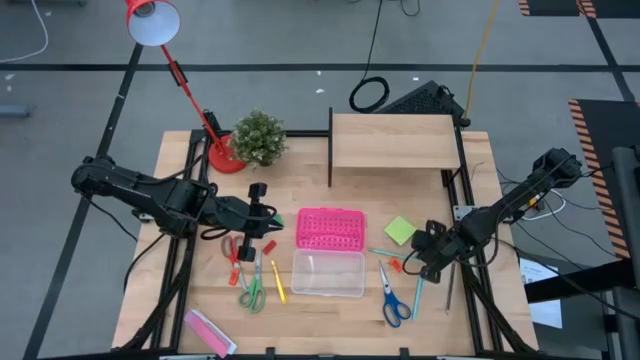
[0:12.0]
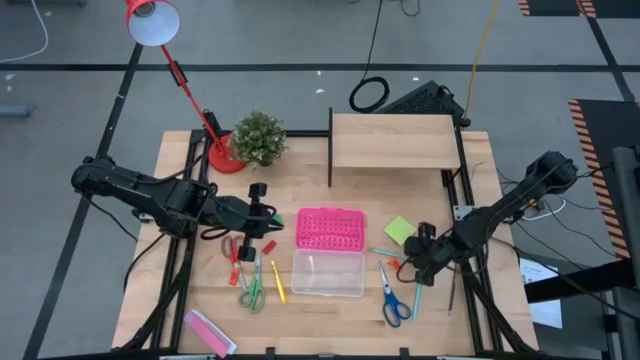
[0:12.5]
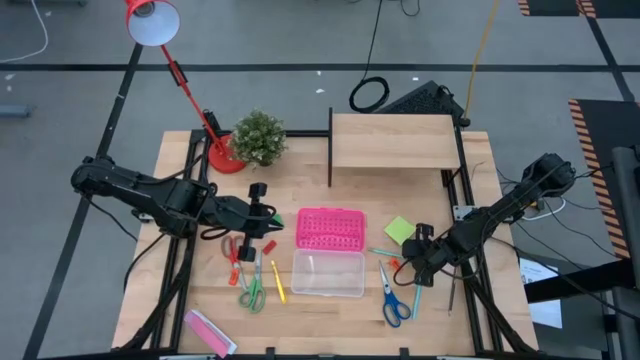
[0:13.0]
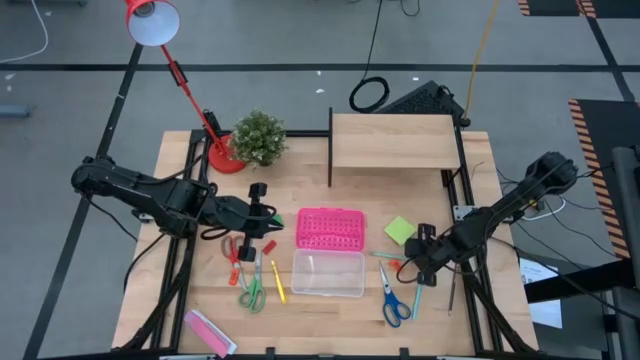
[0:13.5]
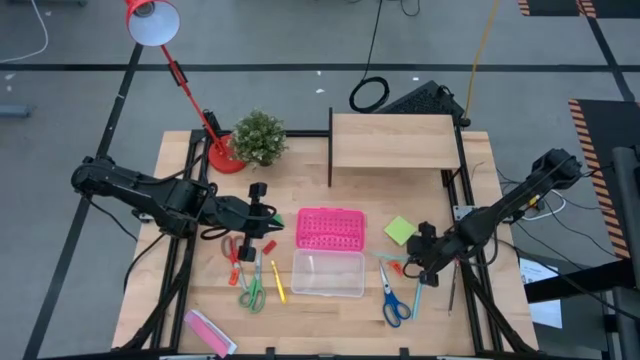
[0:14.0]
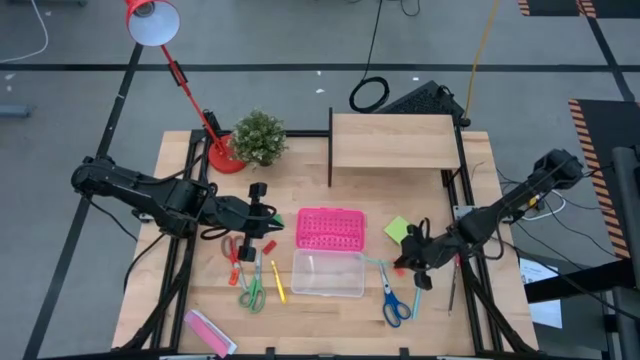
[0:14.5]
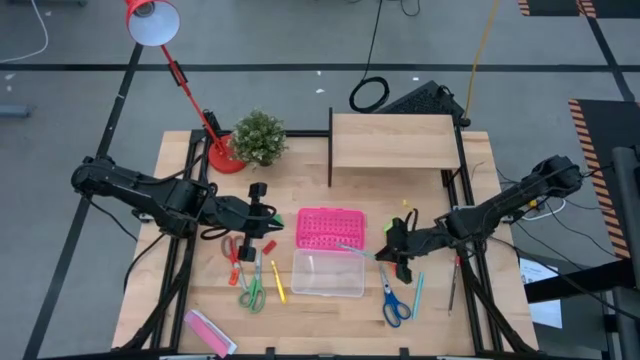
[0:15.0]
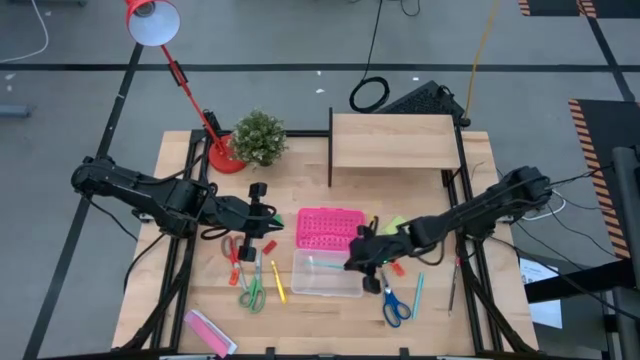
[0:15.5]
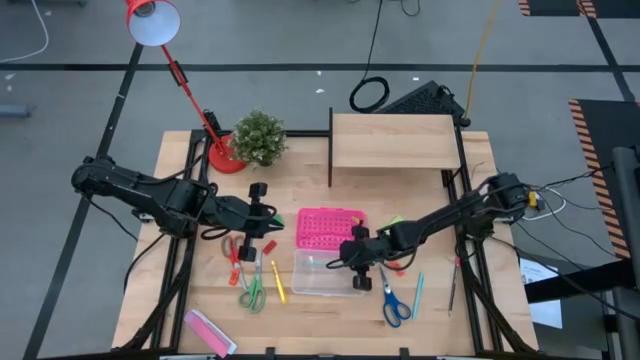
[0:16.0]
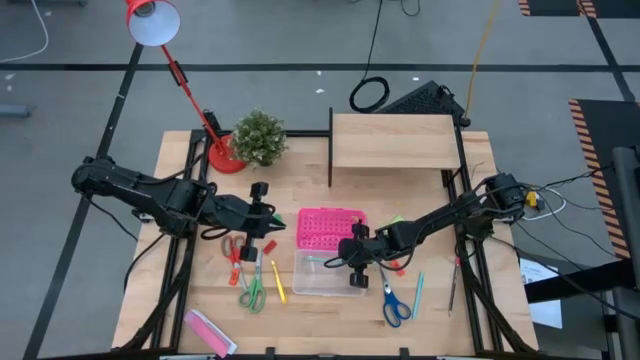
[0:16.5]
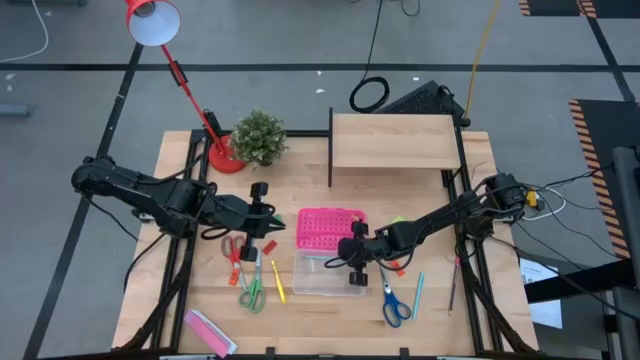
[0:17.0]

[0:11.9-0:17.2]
Task: Pack school essentials
Put the light blue pencil into the pink supply box

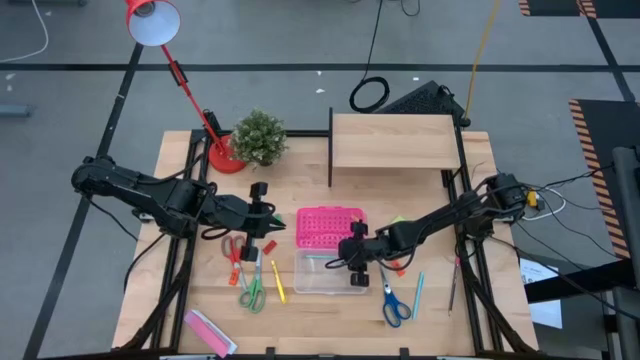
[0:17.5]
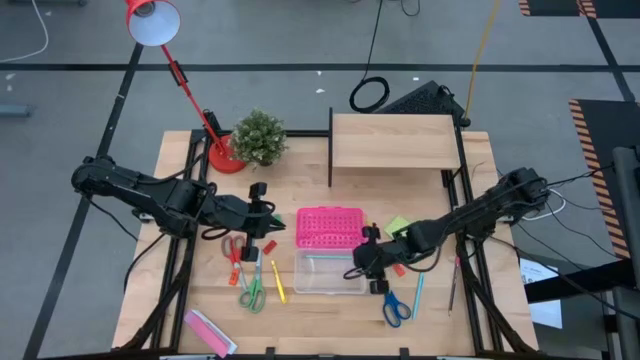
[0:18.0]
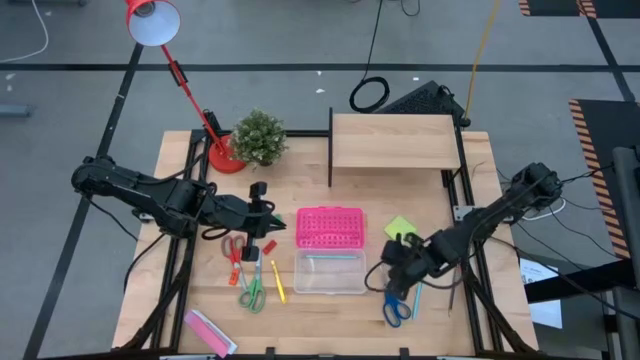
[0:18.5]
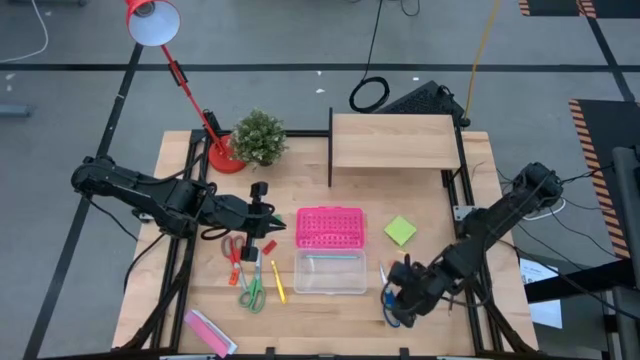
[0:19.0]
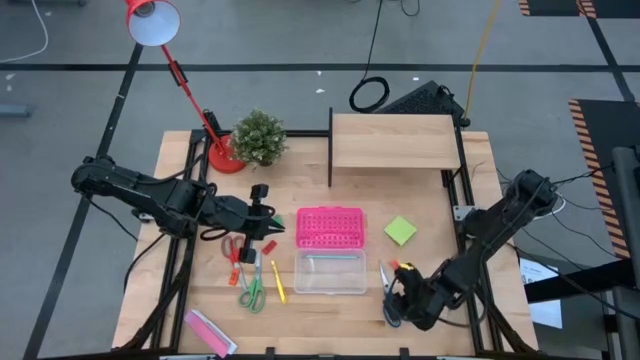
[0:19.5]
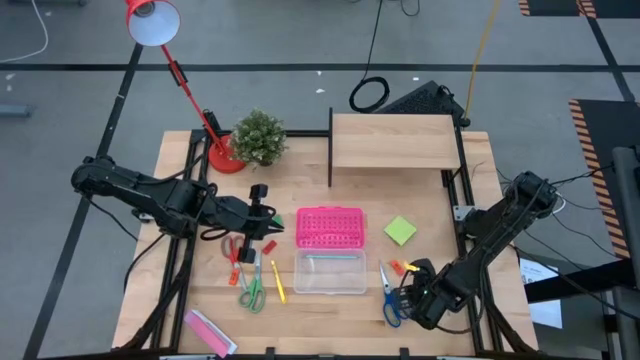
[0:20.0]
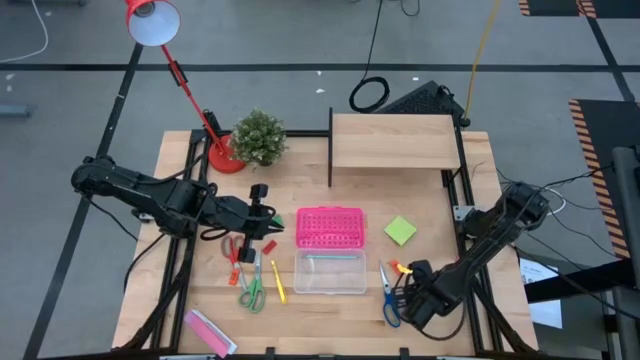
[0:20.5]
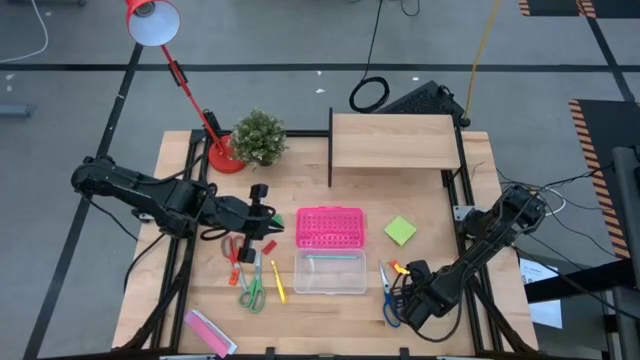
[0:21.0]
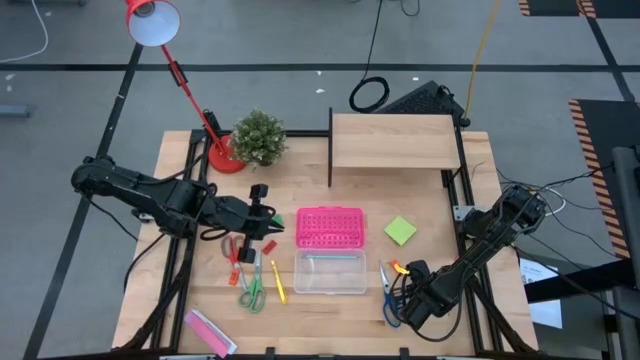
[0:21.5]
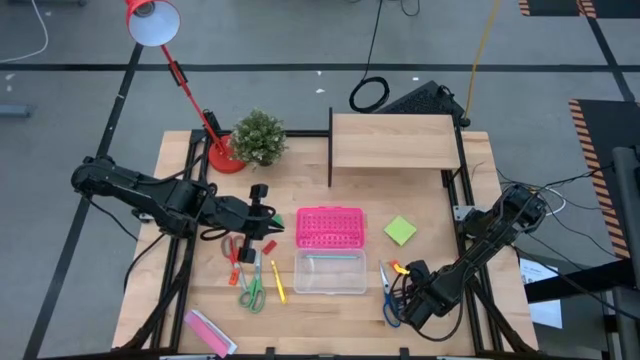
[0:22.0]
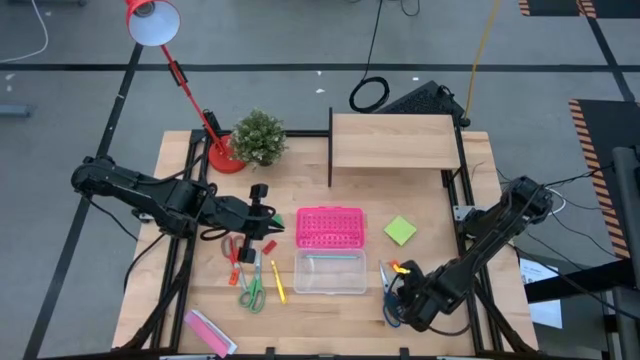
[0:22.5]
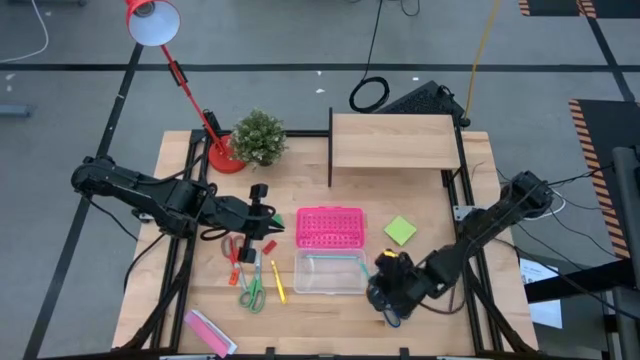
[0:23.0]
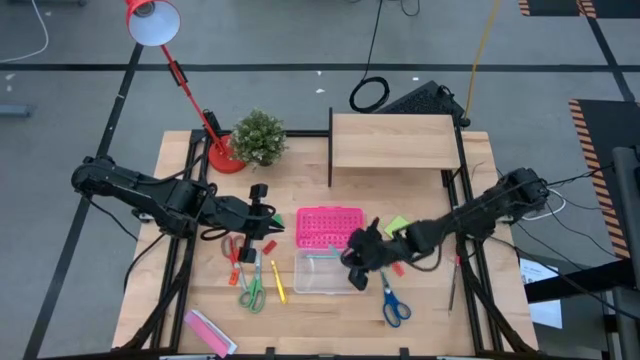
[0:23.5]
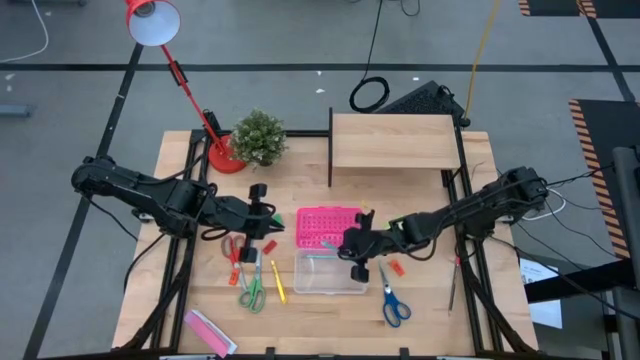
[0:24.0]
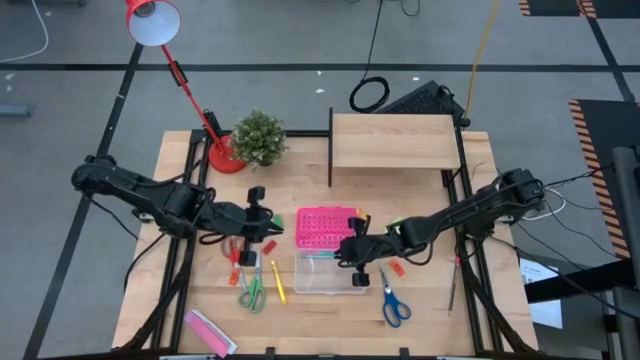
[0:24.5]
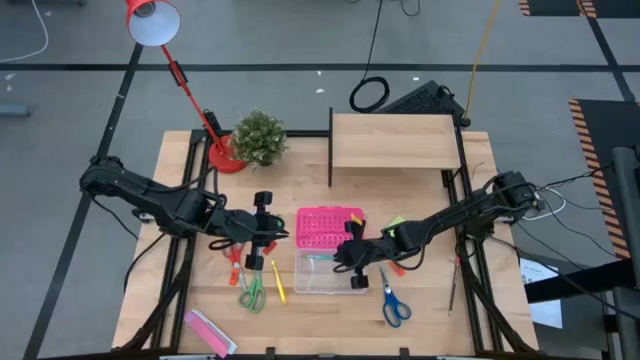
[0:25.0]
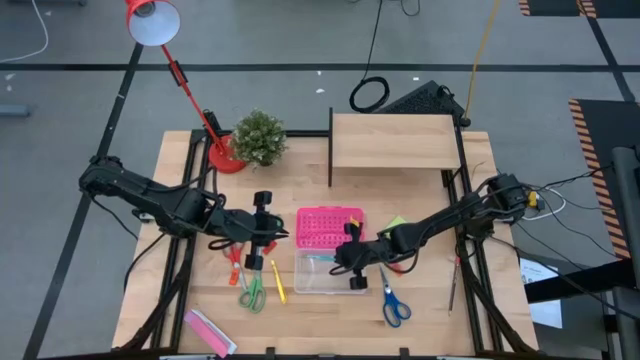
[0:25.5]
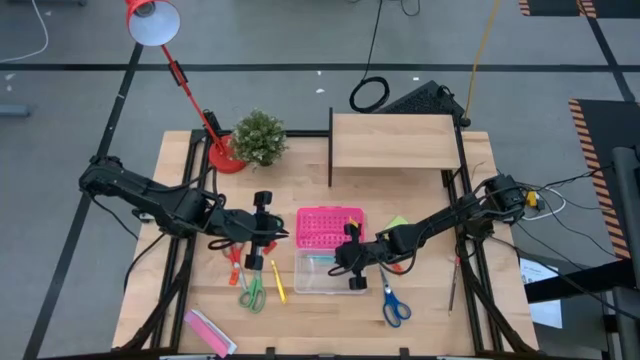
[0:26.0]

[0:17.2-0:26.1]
Put the light blue pen into the pink supply box

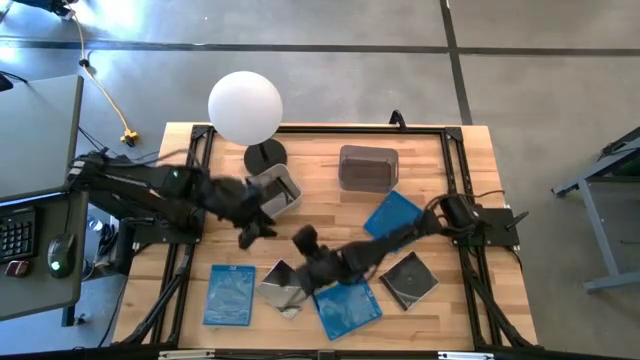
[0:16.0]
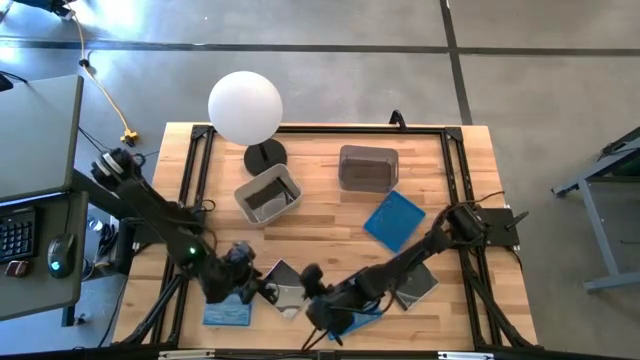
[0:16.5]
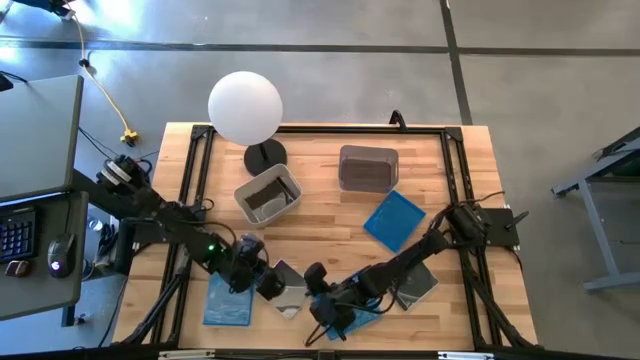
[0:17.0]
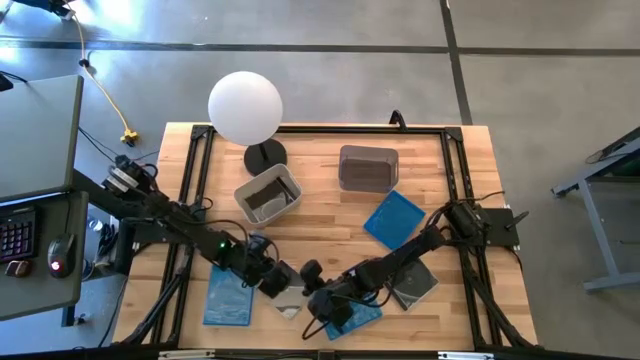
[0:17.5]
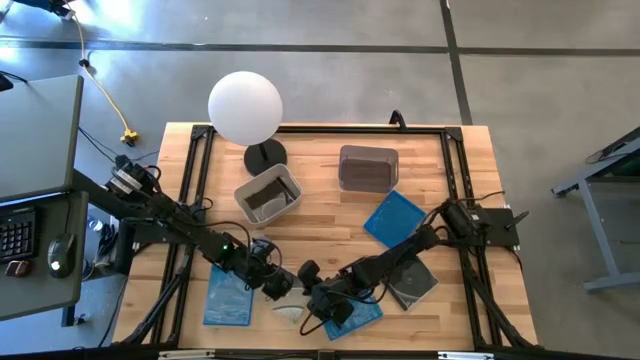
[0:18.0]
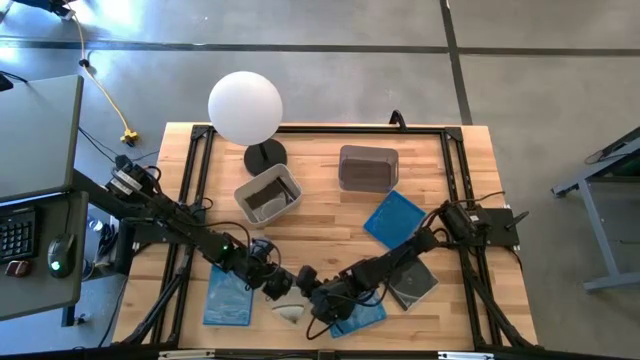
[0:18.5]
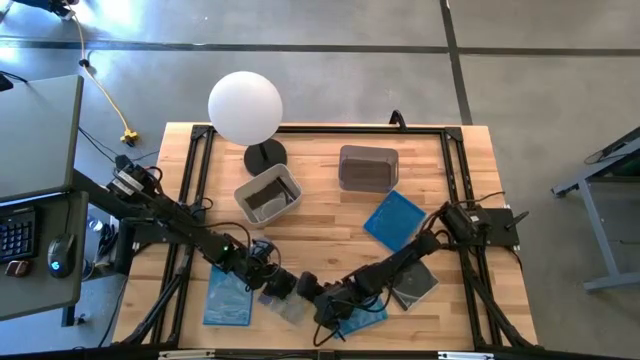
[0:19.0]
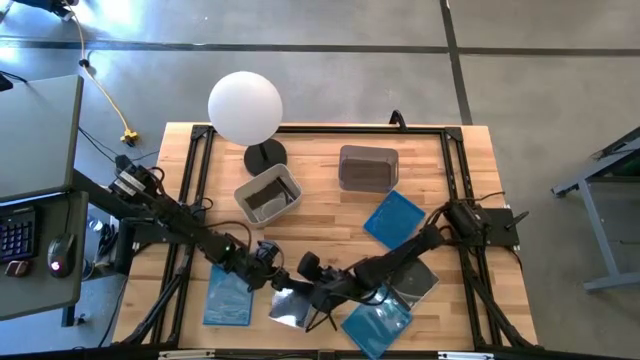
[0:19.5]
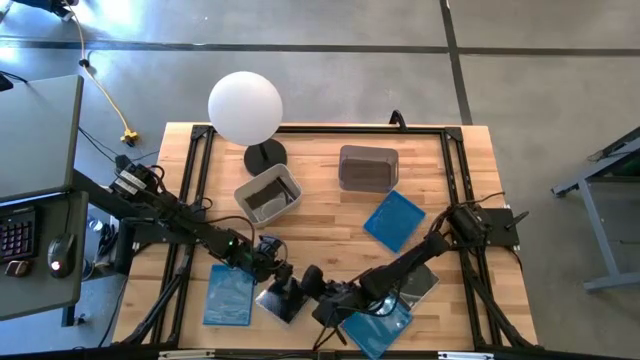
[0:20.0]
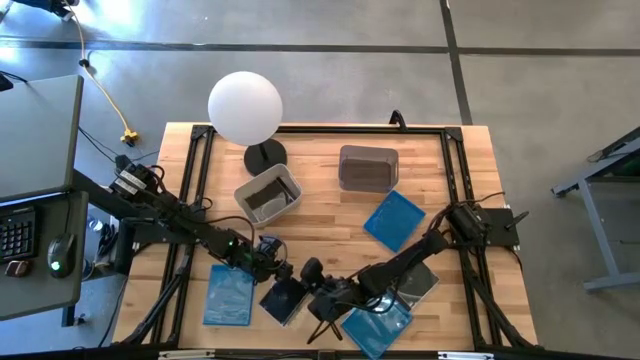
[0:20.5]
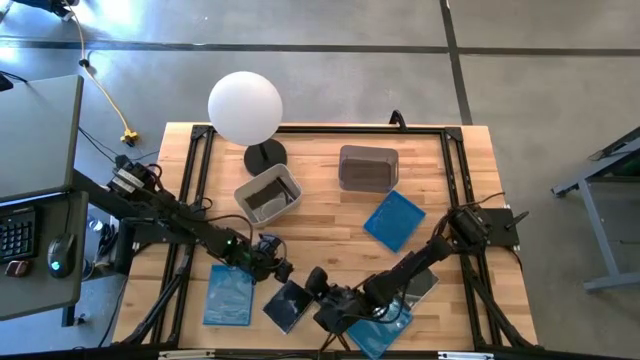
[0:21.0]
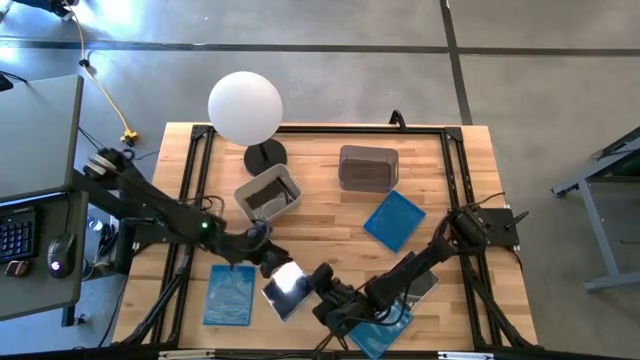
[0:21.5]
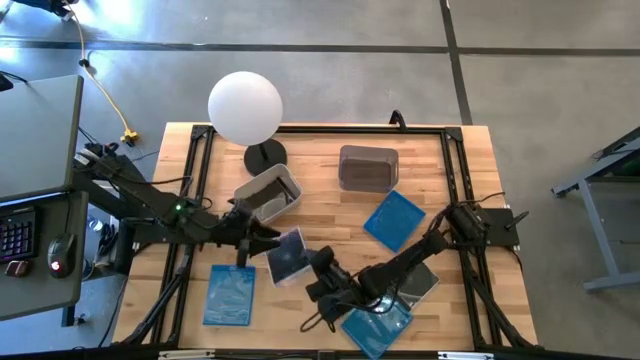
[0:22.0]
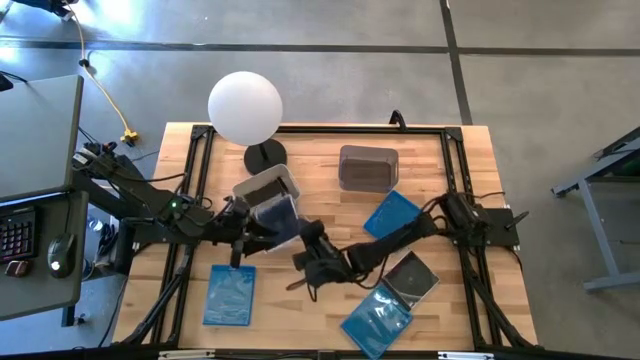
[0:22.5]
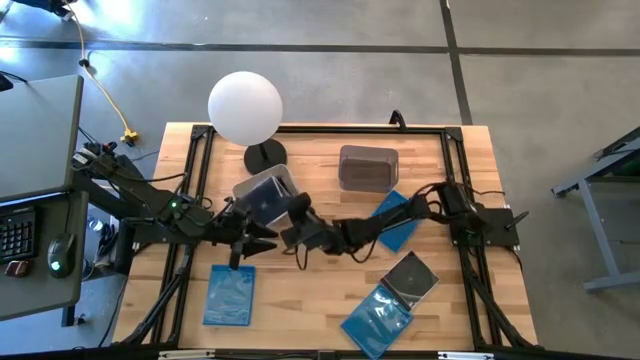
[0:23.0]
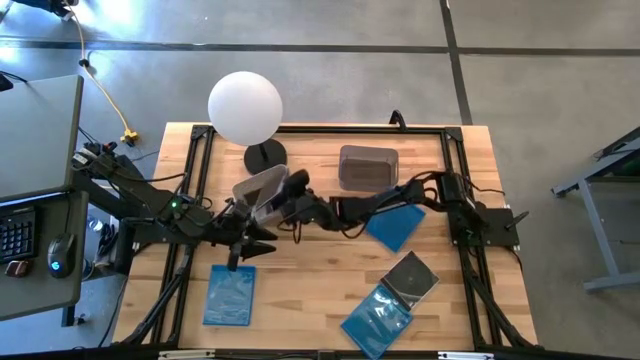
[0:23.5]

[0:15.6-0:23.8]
Task: Pick & place jewel cases by type
Put the left black CD case into the gray bin
